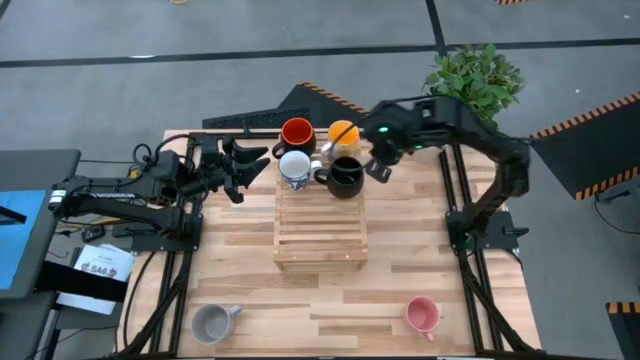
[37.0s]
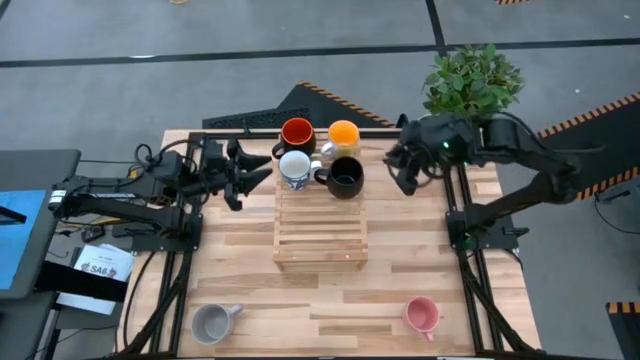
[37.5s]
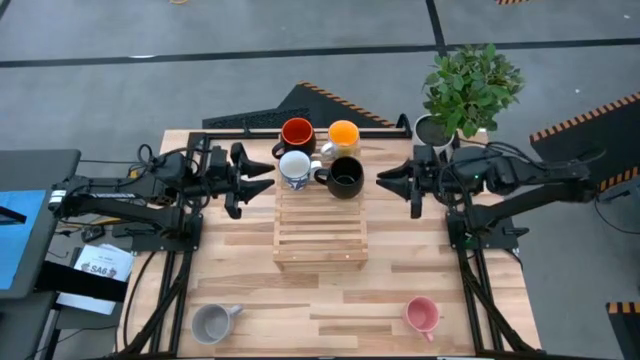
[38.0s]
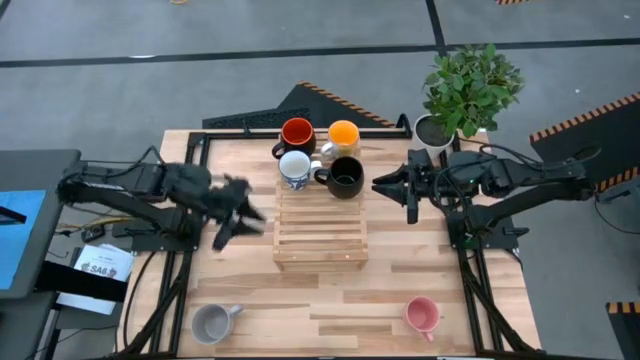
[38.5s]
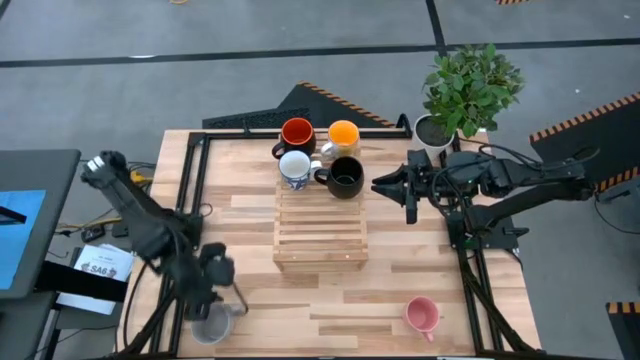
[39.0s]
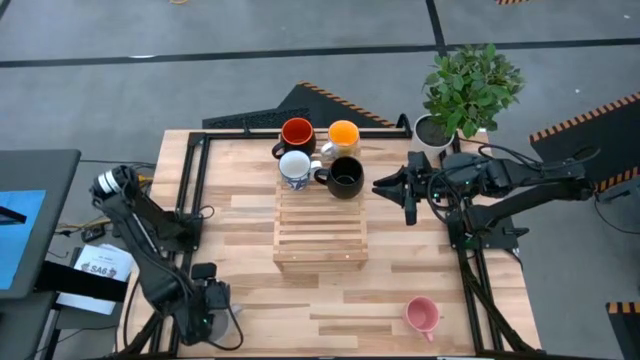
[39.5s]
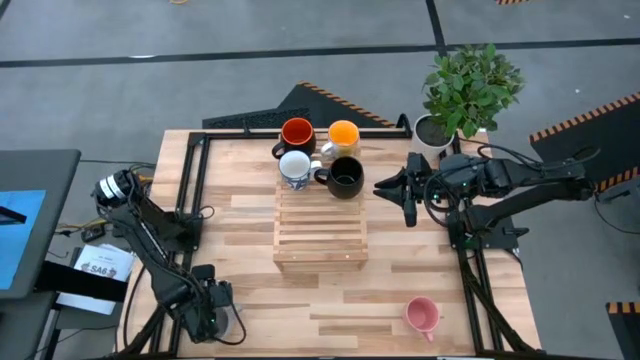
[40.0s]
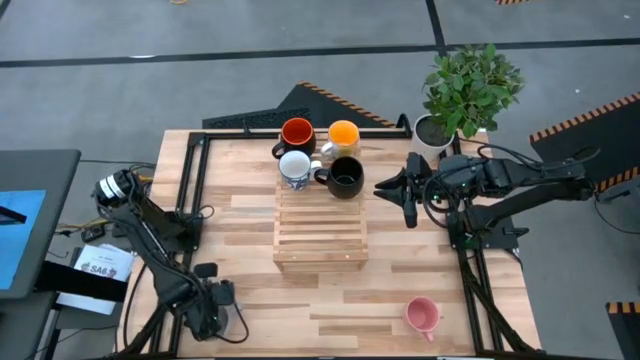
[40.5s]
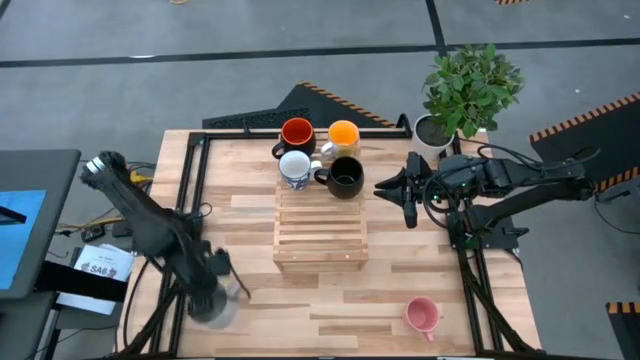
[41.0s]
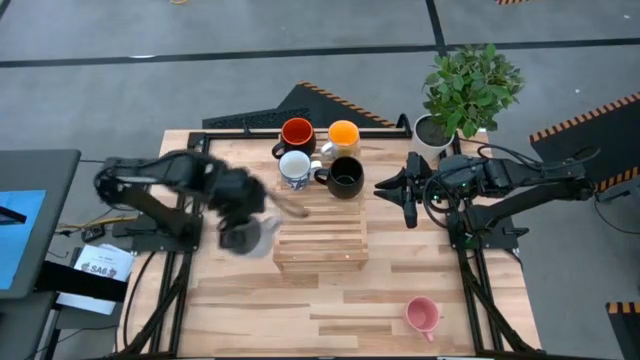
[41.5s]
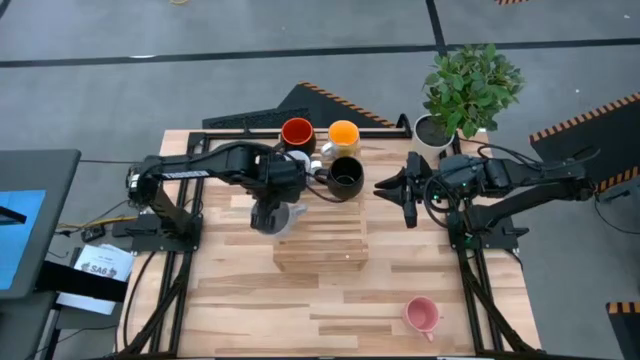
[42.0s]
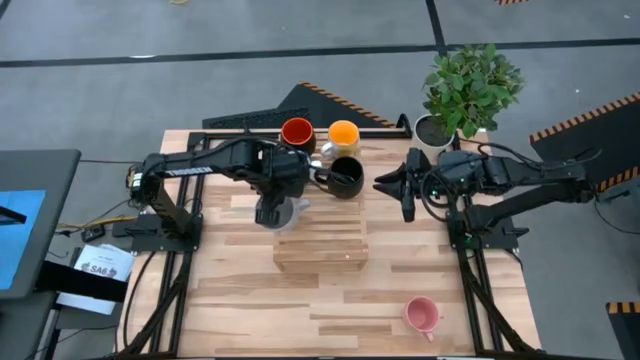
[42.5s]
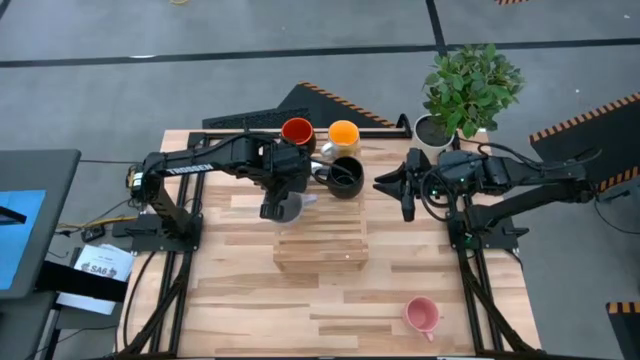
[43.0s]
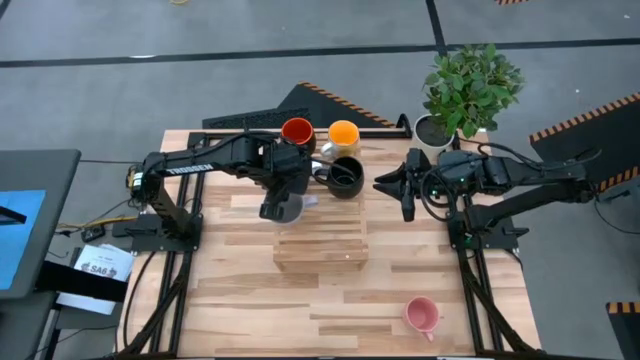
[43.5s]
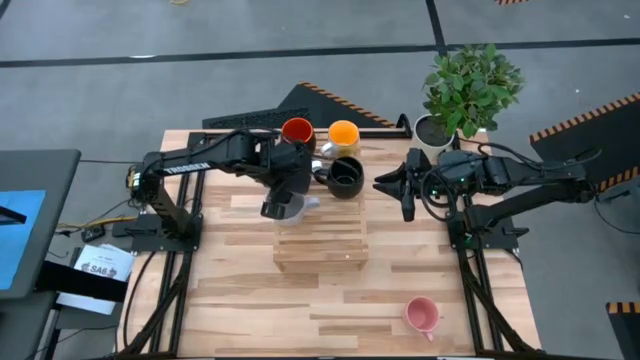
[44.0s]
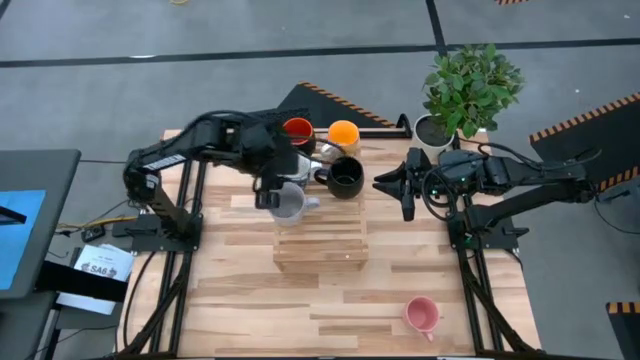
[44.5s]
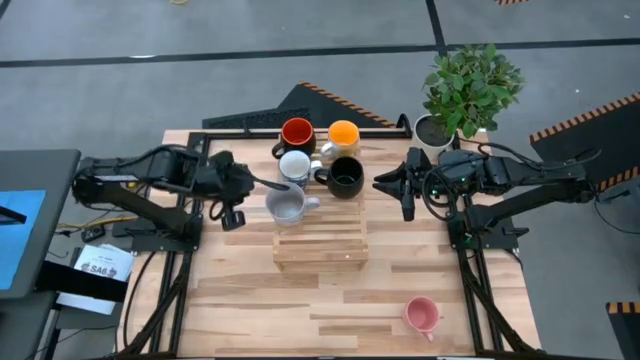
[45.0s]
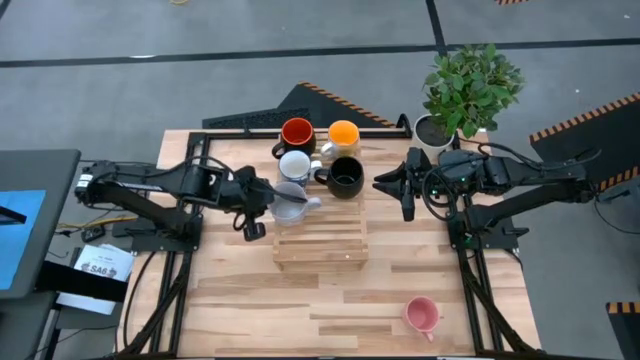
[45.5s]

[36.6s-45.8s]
Task: Place coffee mugs
Put the gray mug on the shelf

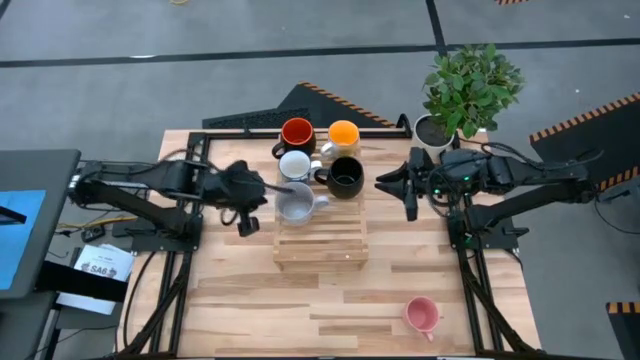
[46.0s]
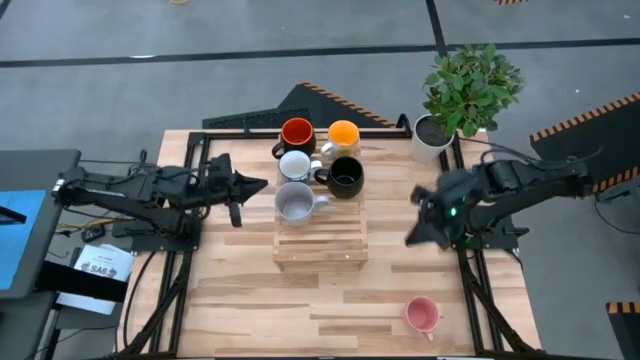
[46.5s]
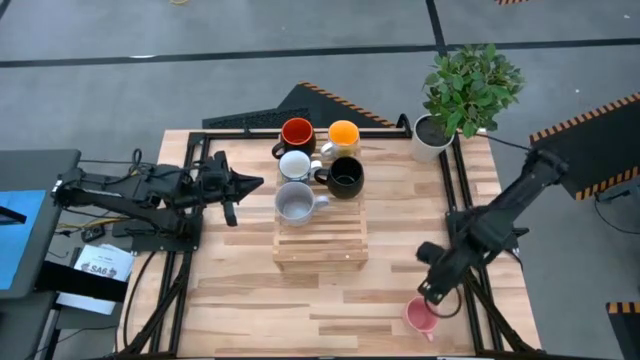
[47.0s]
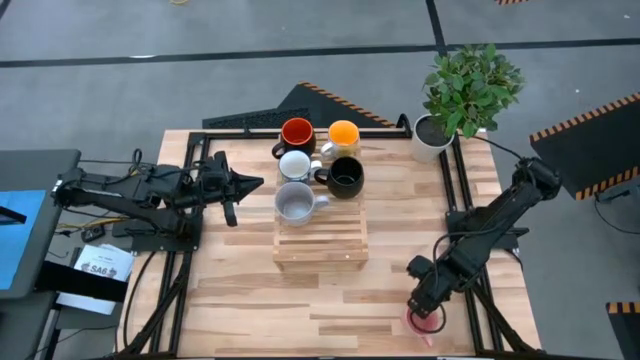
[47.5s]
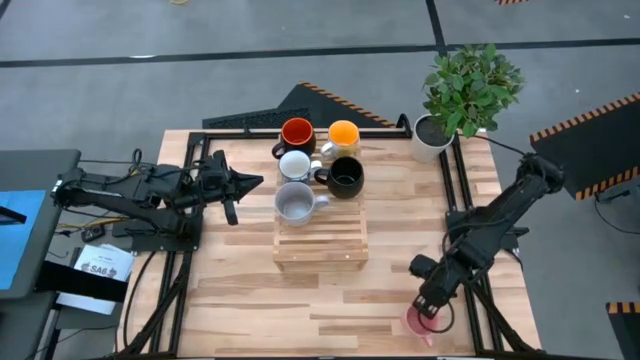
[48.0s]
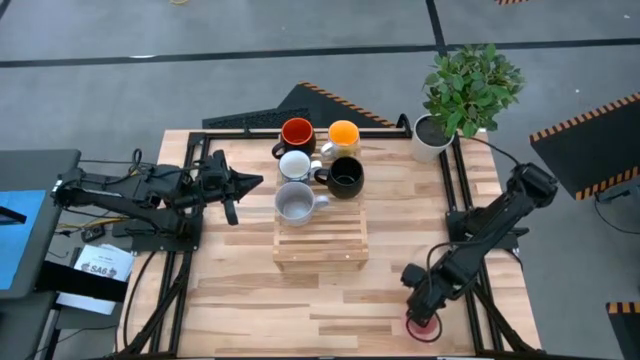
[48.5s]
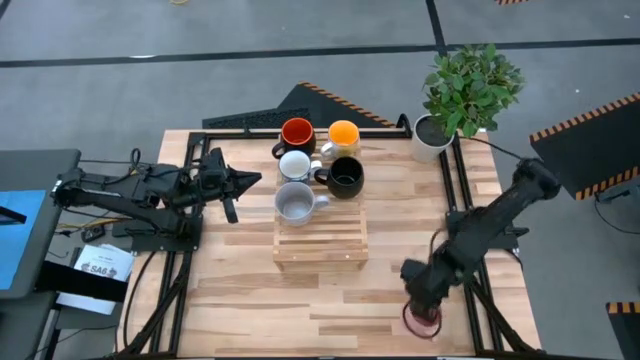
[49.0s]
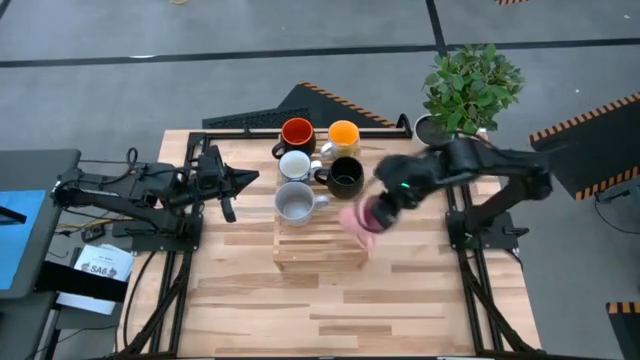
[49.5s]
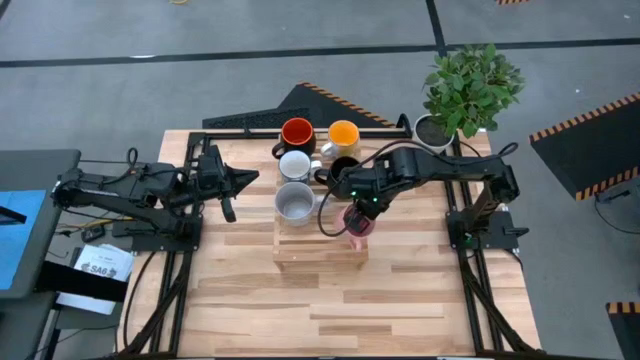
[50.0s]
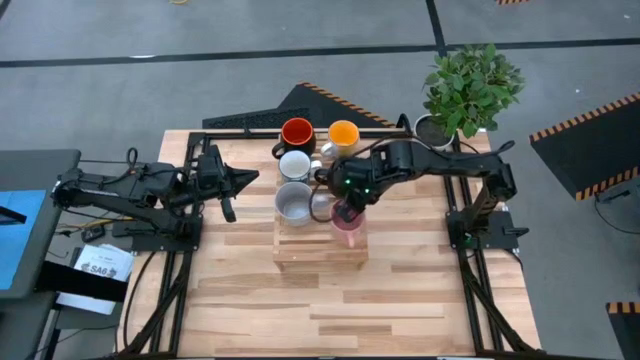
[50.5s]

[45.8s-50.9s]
Put the pink mug on the shelf

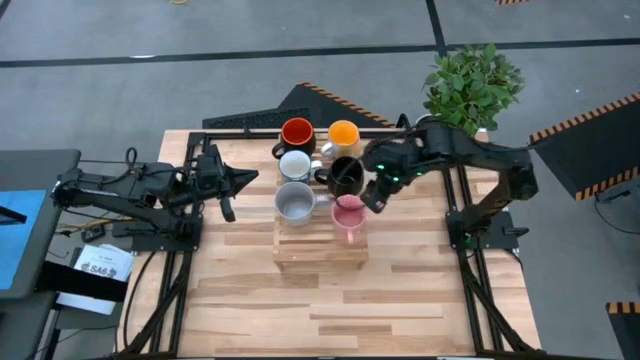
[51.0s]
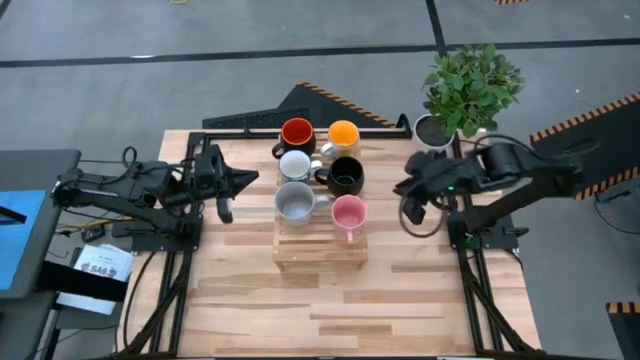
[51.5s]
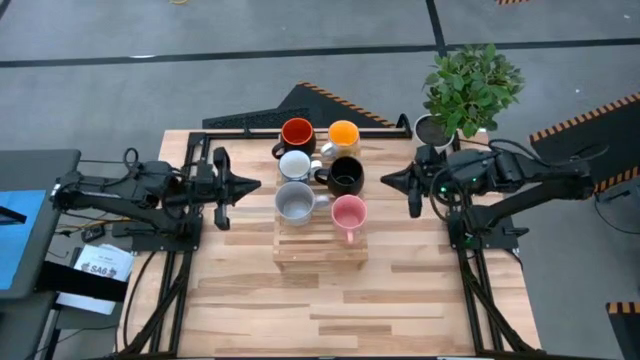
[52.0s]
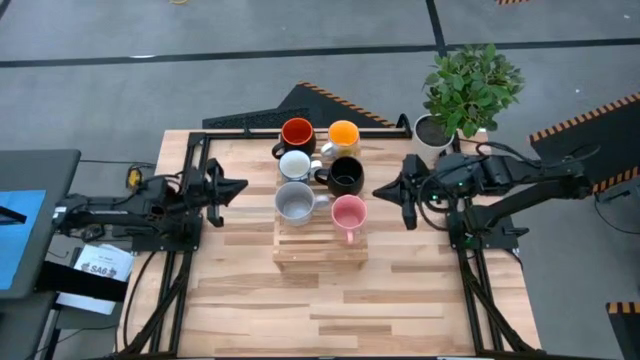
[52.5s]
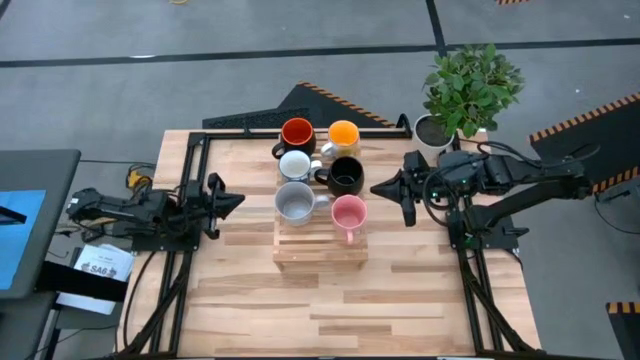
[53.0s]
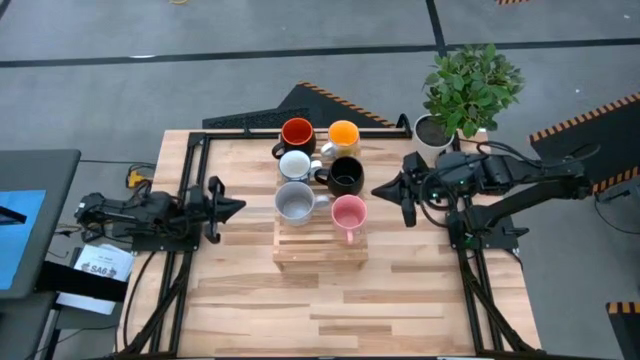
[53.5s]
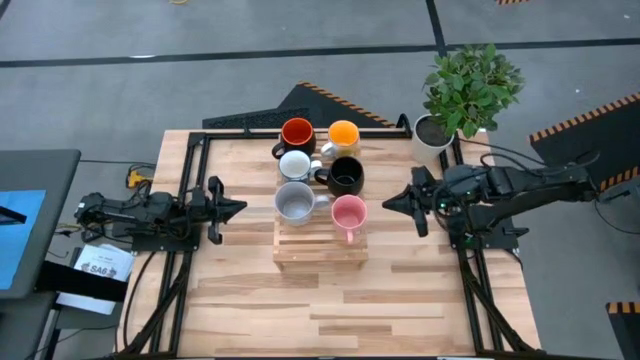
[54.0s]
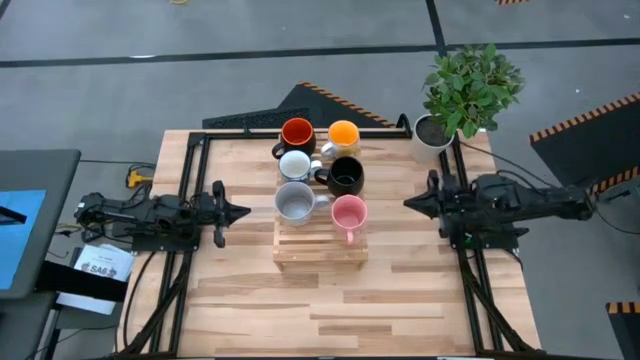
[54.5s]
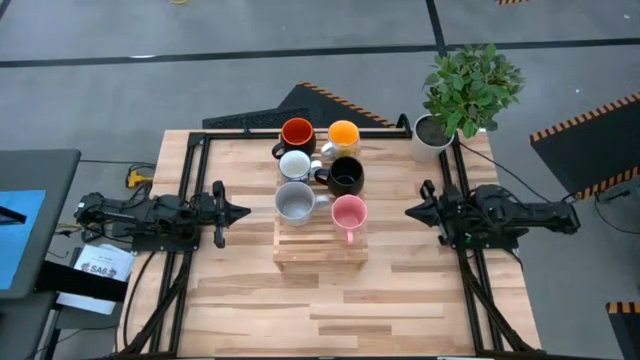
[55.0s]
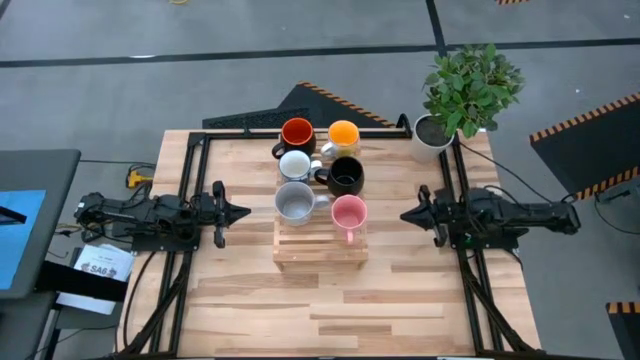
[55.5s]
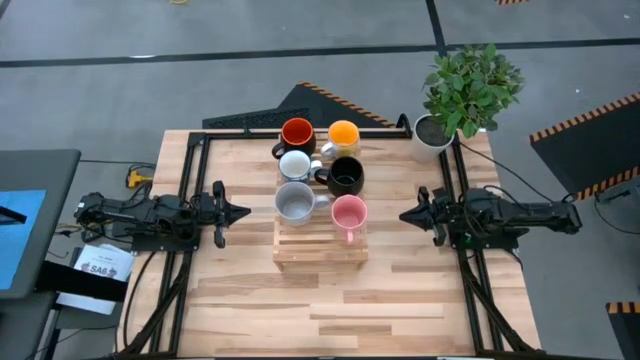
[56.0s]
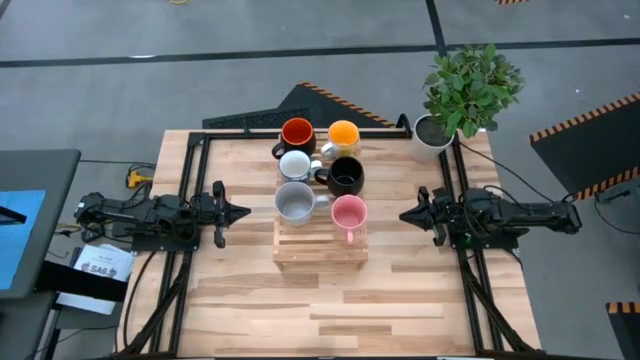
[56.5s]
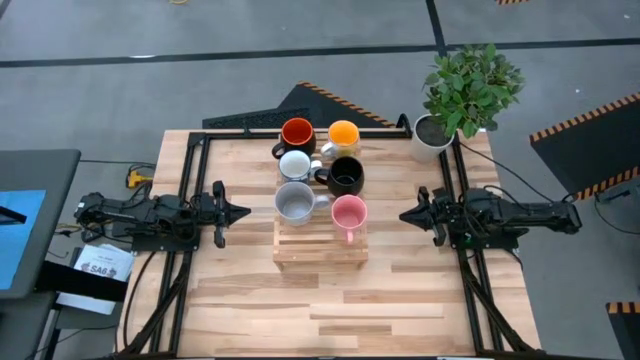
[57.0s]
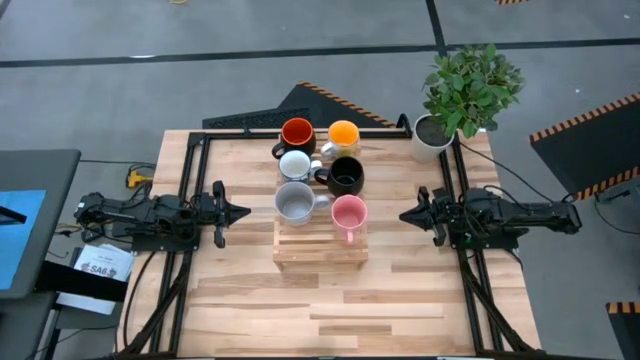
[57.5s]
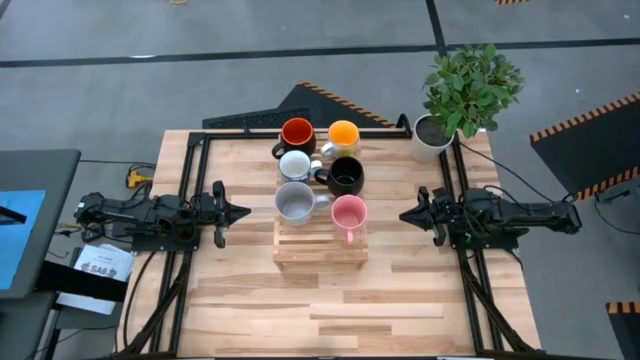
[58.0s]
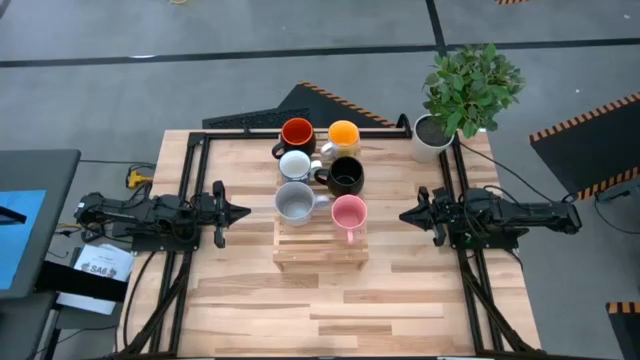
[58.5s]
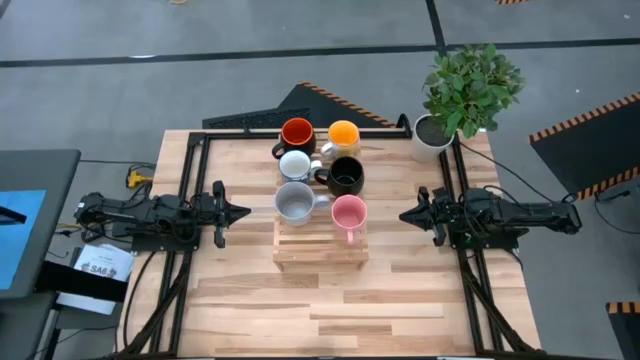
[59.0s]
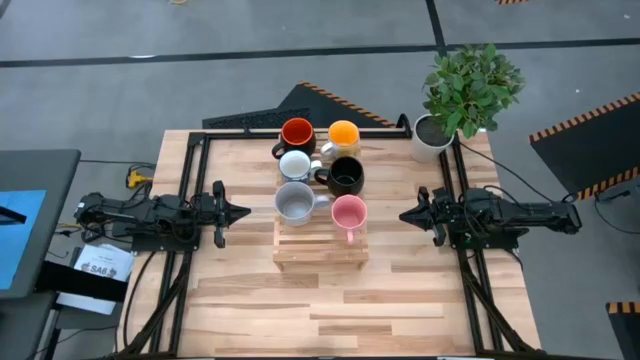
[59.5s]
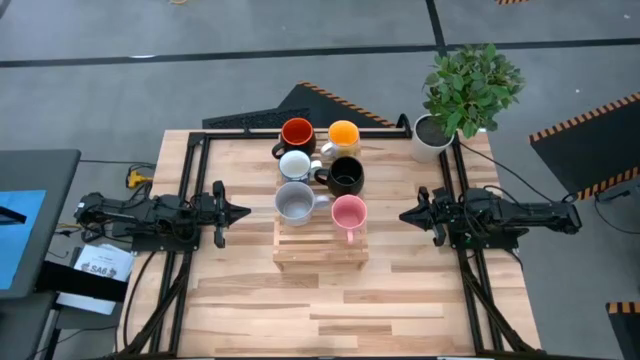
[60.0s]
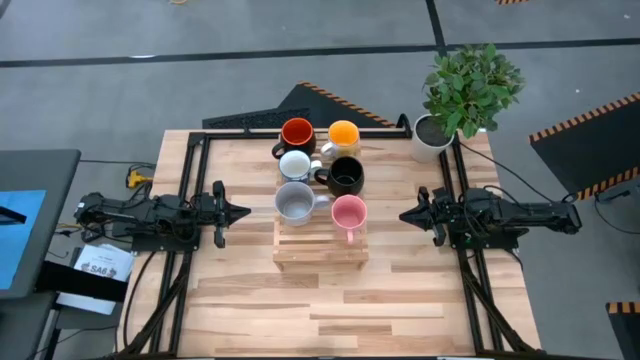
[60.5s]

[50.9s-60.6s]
Return to Home Position
